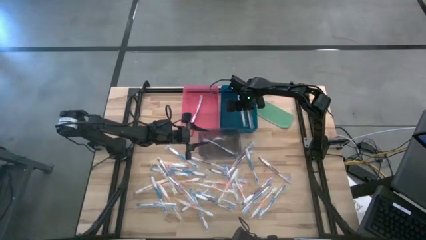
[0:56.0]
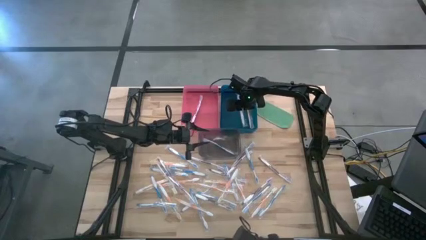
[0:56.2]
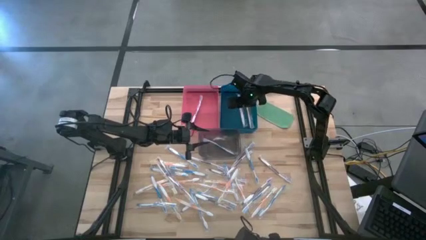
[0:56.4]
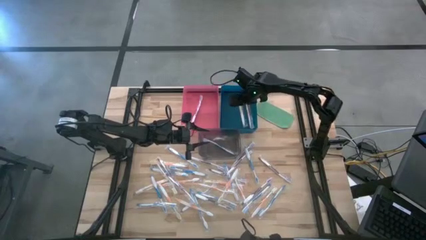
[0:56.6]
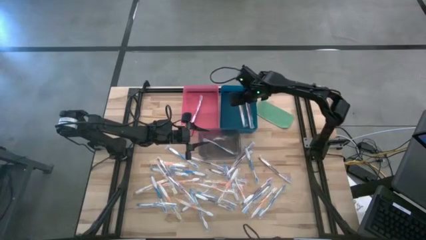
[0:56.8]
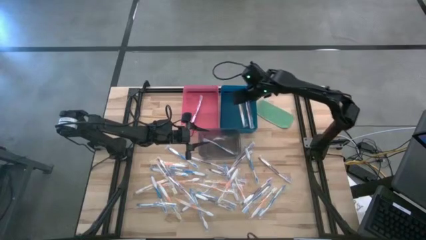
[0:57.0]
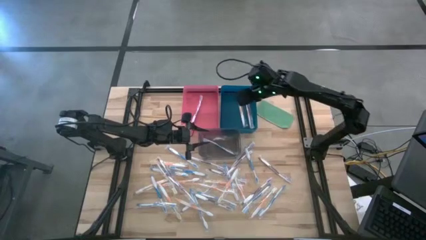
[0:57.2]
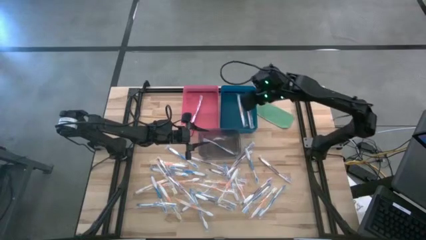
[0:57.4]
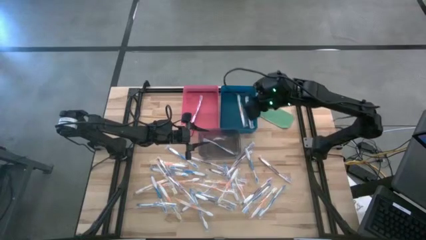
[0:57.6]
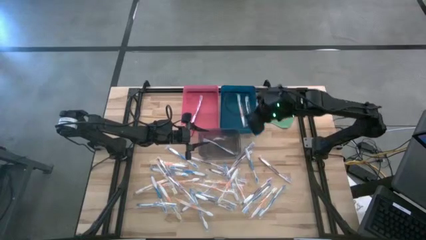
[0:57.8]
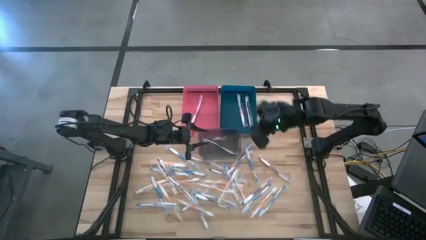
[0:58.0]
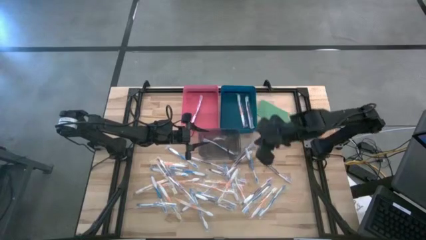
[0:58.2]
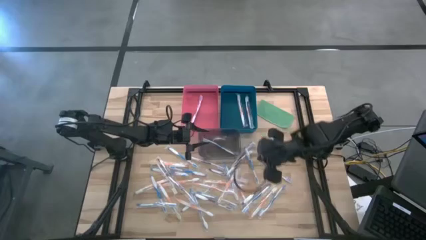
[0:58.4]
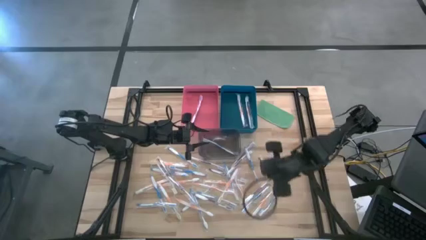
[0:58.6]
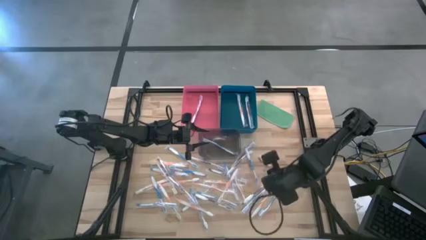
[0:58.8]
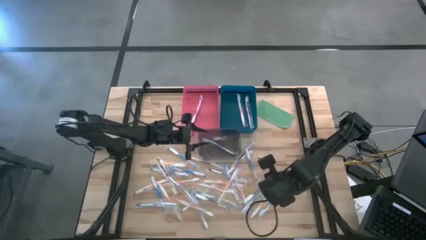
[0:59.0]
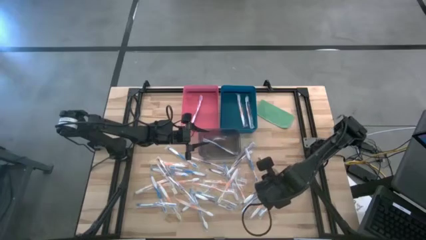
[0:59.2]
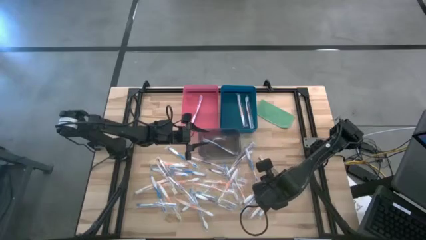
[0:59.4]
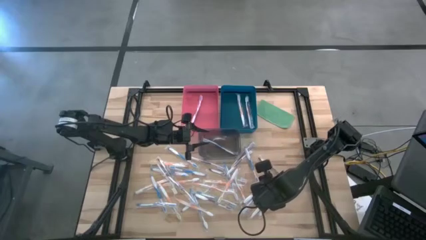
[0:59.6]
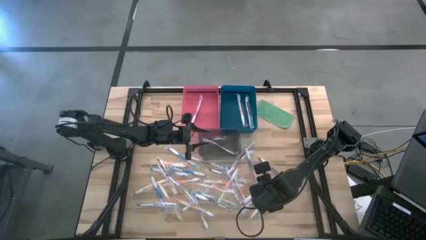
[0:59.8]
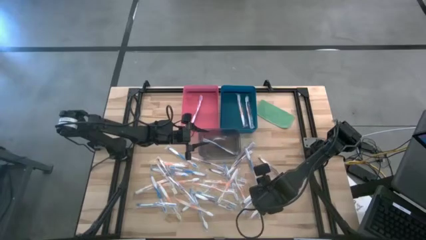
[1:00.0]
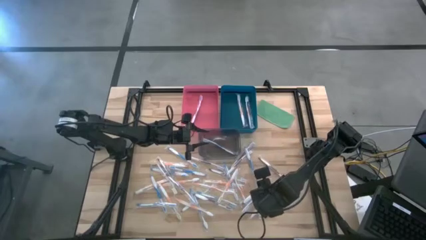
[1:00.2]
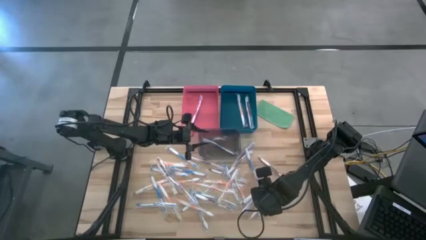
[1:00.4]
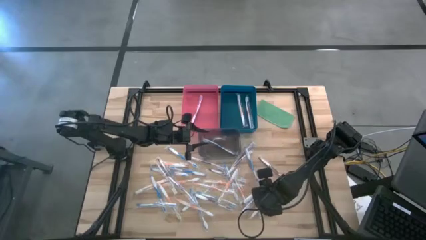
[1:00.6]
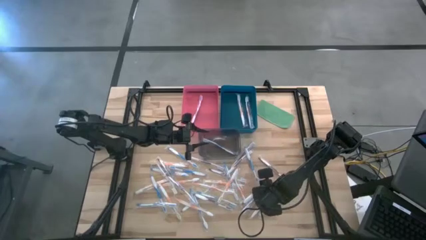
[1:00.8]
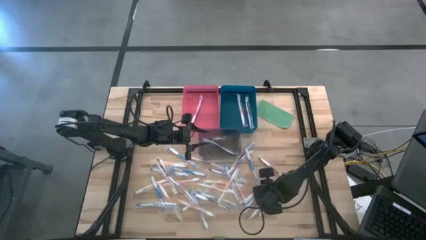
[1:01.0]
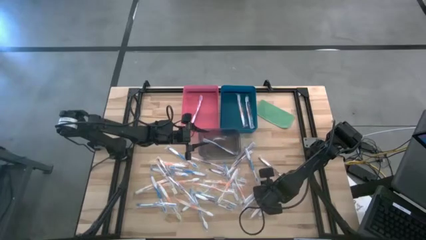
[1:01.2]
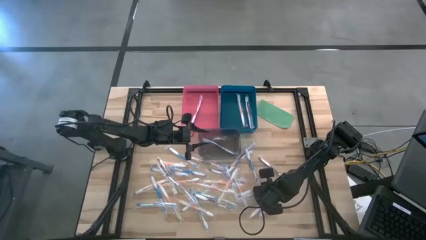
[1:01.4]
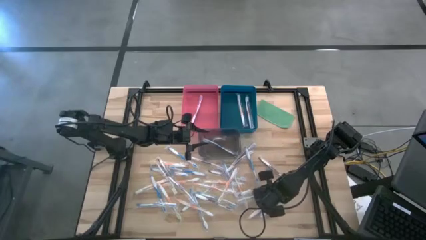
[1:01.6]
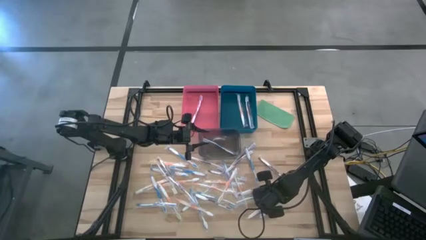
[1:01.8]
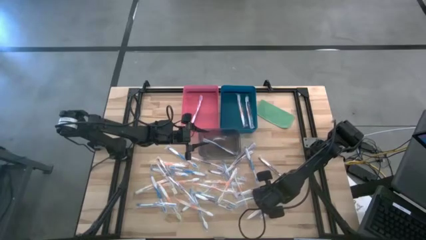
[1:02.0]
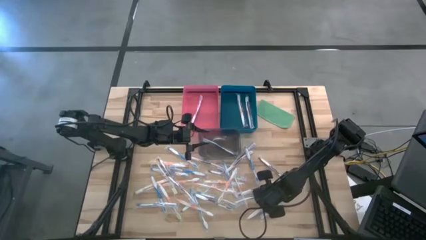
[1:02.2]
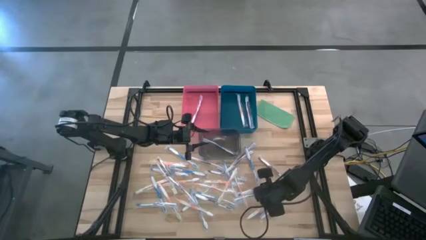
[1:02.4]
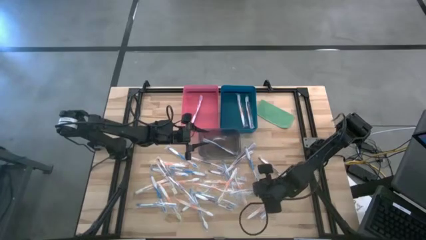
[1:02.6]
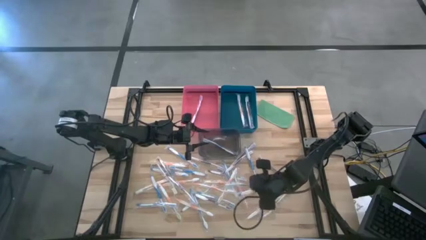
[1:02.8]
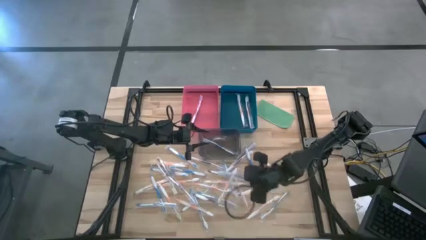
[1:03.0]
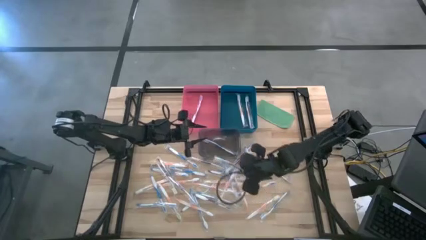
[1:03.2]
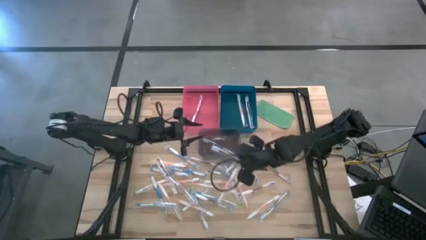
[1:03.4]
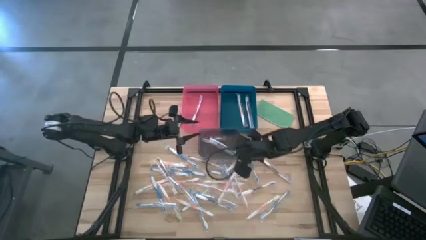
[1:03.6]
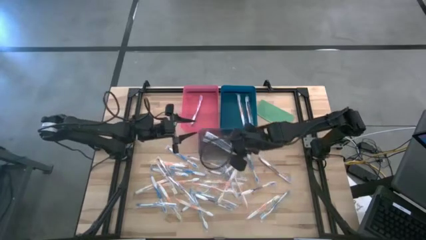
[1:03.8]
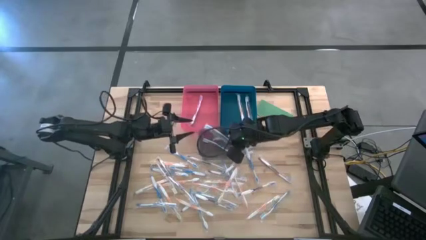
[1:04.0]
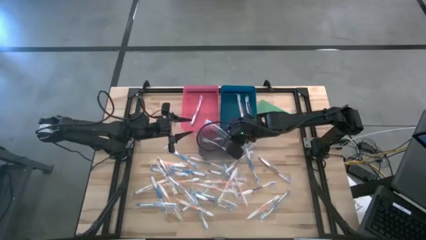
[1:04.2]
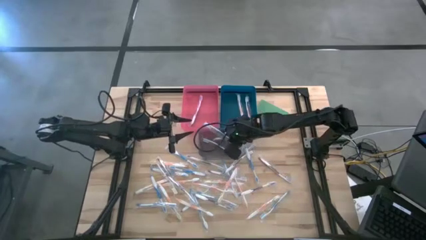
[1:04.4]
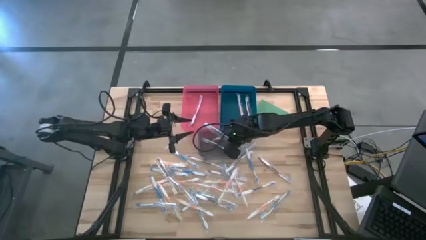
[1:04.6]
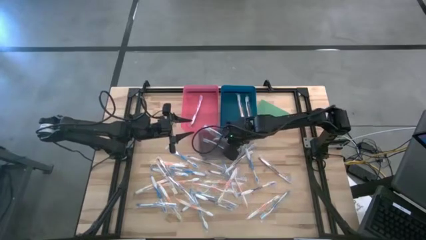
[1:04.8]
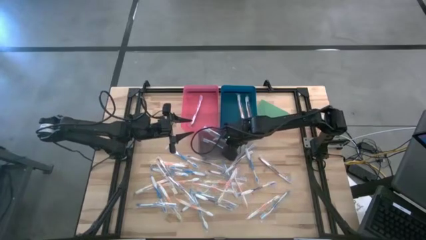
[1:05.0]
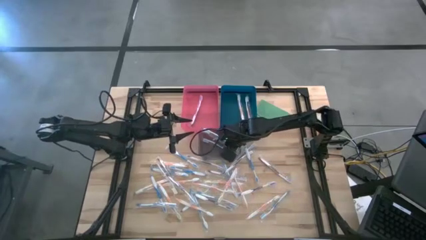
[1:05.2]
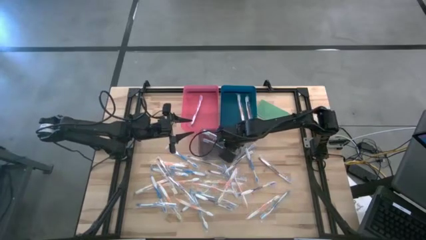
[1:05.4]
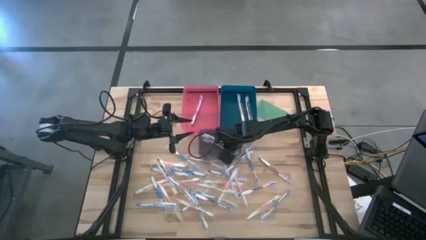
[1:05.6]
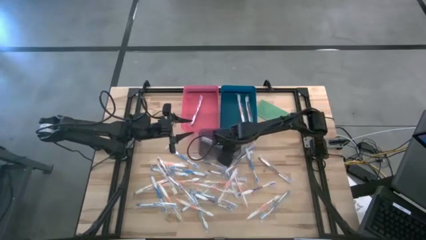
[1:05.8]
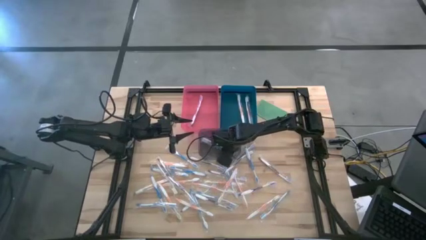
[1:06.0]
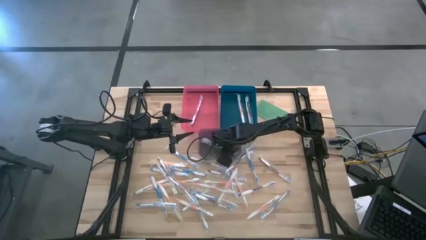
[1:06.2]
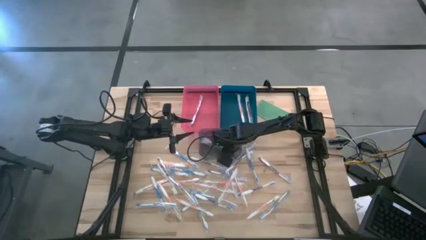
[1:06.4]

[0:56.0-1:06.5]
Task: Pick & Place Toothbrushes
Put the blue toothbrush into the transparent gray bin

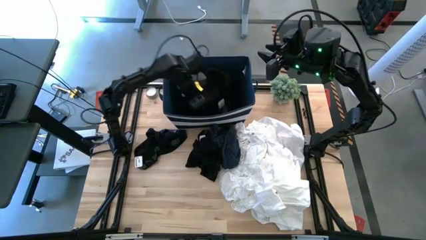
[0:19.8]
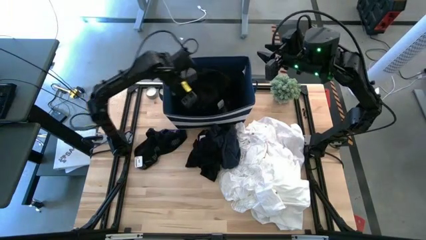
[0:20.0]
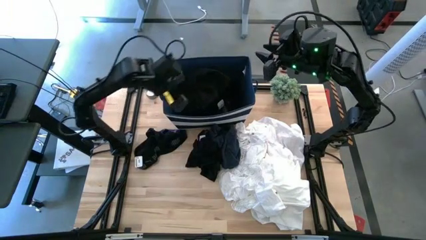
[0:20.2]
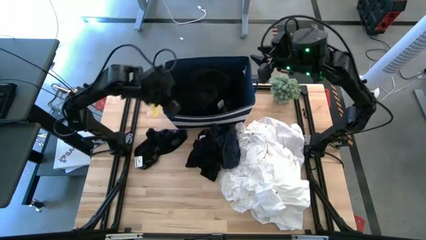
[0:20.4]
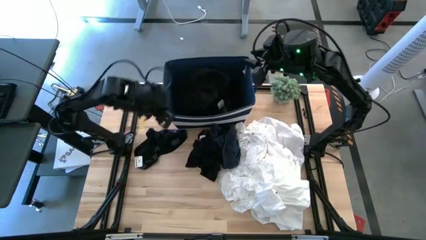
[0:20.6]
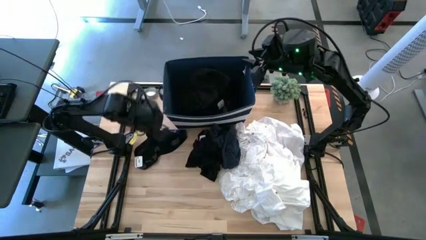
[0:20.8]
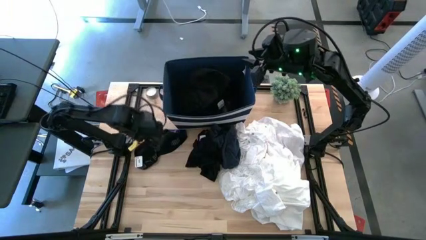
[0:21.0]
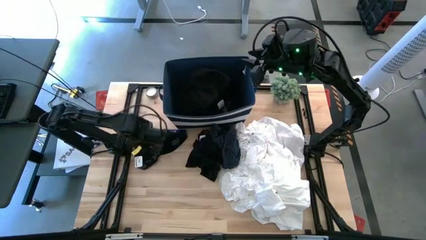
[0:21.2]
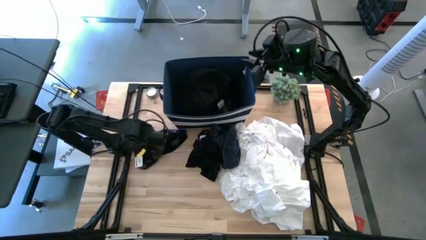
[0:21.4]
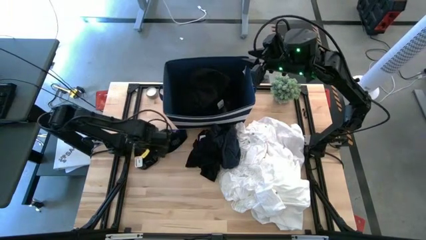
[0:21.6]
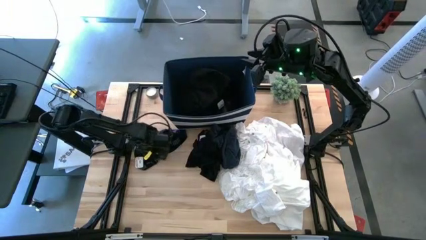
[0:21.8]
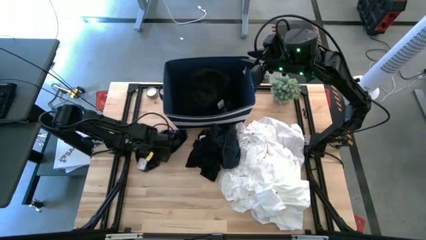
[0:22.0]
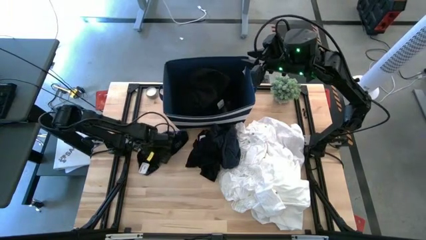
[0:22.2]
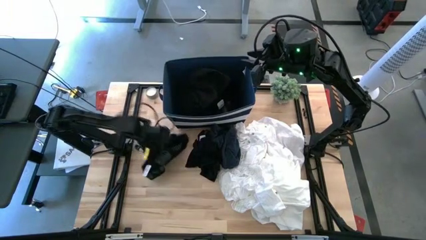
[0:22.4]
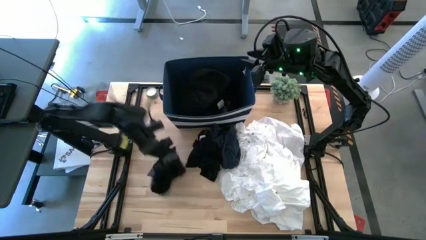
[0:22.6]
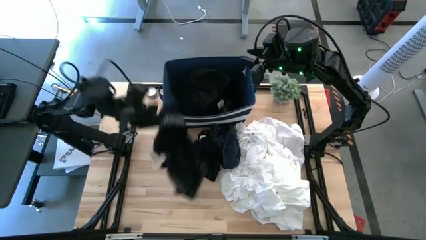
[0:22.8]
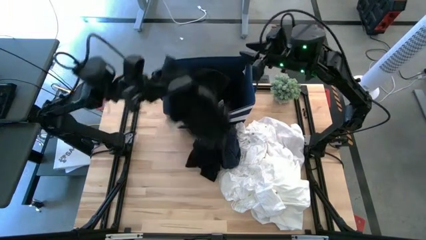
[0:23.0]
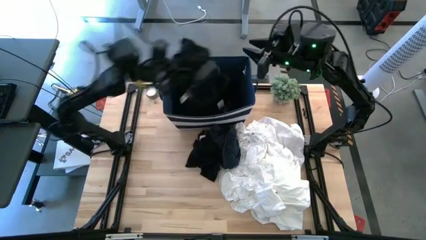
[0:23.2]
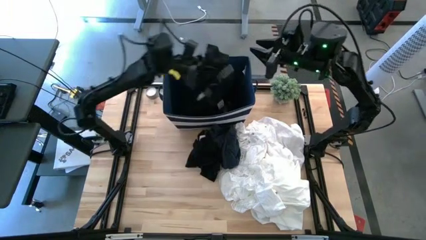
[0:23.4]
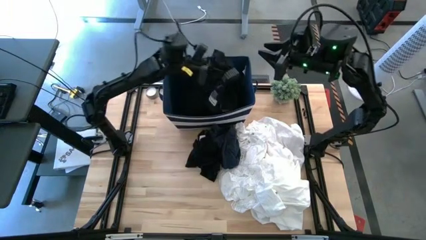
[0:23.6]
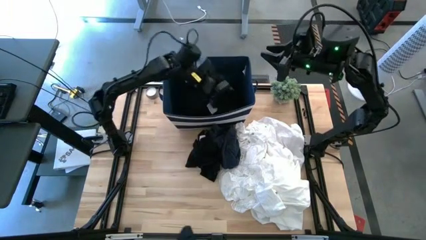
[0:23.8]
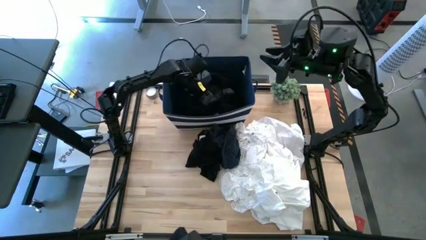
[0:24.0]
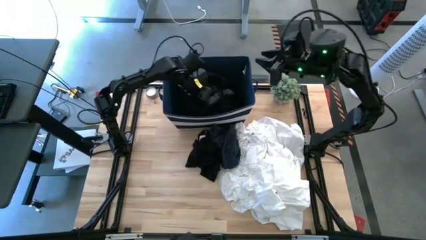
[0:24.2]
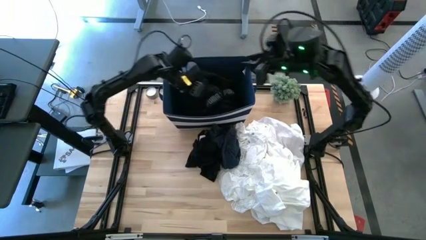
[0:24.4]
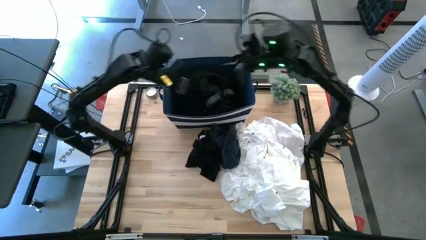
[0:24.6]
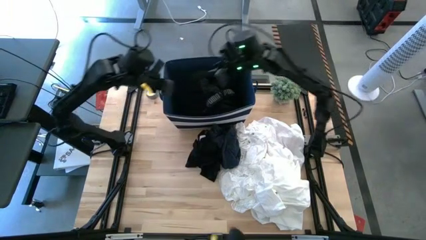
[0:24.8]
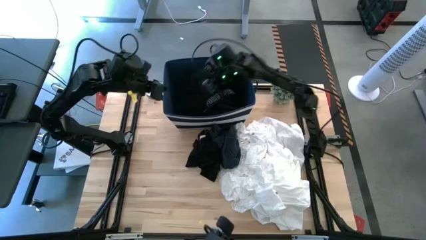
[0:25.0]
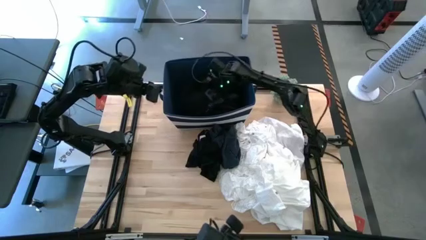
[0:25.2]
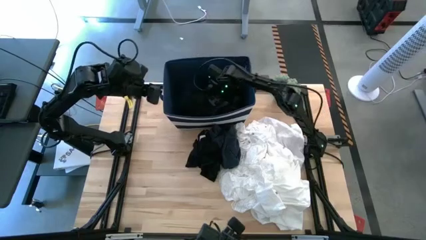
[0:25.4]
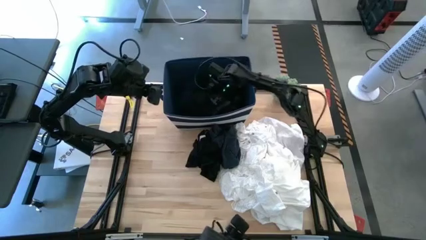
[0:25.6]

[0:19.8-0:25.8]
Task: Sort clothes
Put the left black underwear into the blue bin
